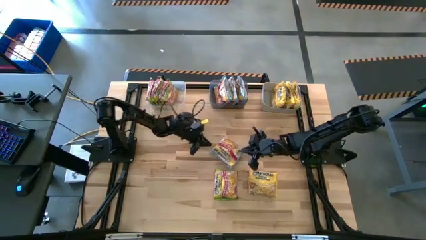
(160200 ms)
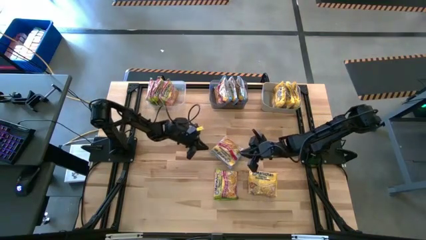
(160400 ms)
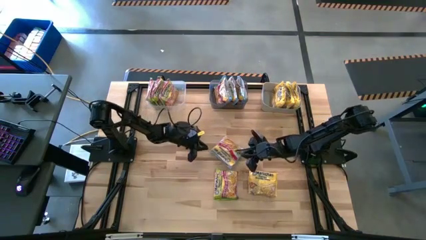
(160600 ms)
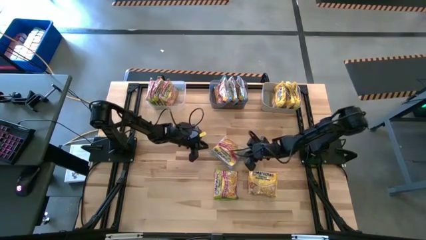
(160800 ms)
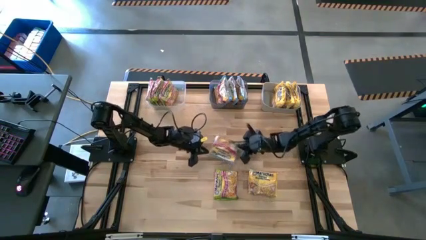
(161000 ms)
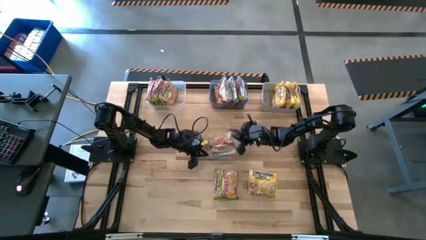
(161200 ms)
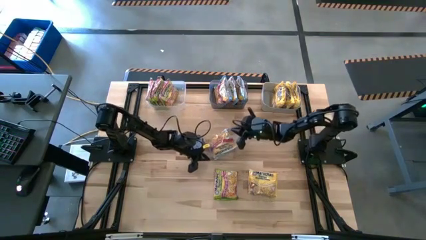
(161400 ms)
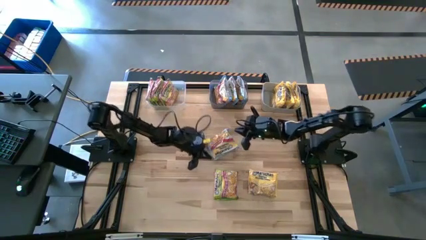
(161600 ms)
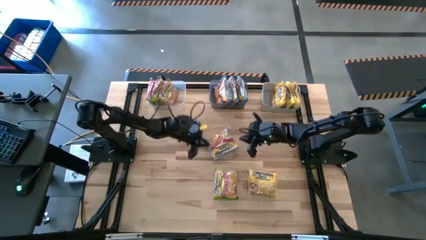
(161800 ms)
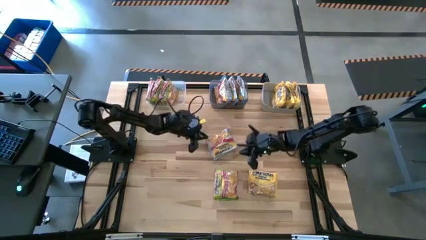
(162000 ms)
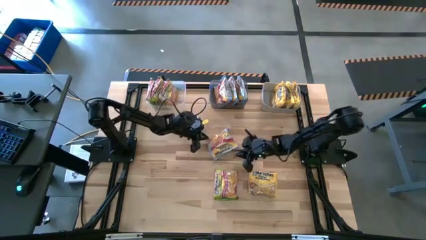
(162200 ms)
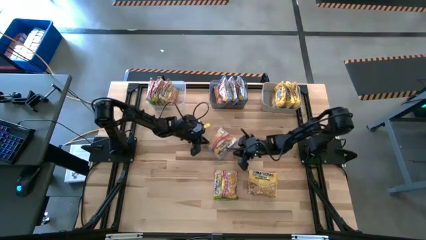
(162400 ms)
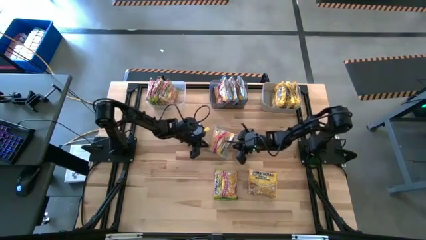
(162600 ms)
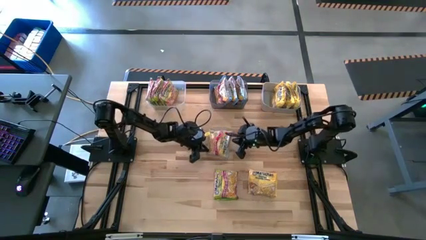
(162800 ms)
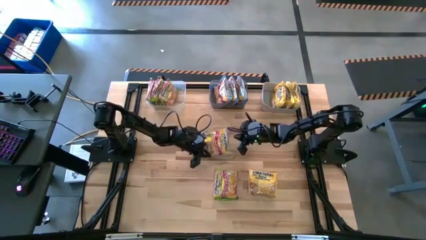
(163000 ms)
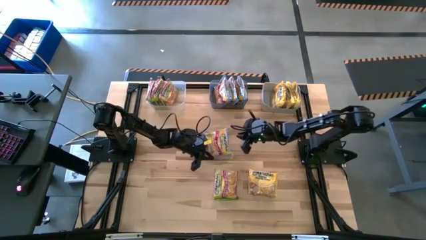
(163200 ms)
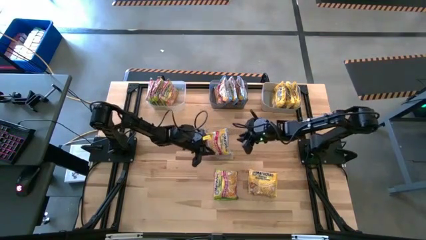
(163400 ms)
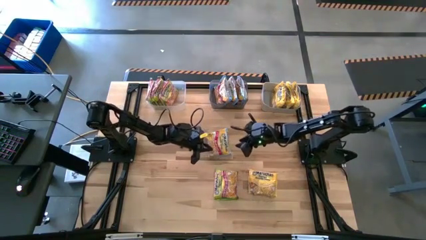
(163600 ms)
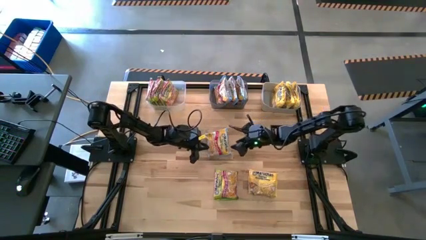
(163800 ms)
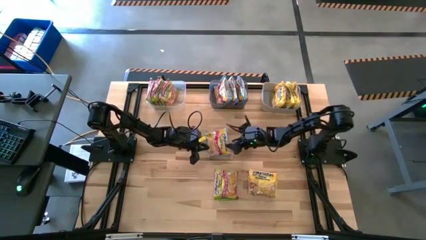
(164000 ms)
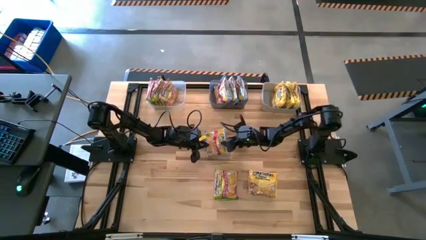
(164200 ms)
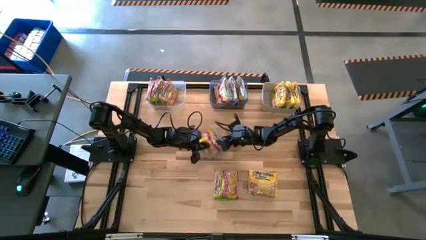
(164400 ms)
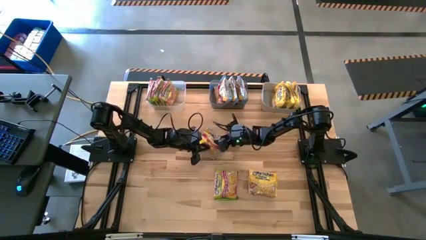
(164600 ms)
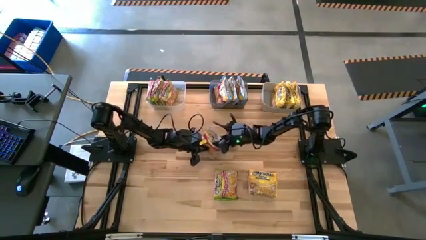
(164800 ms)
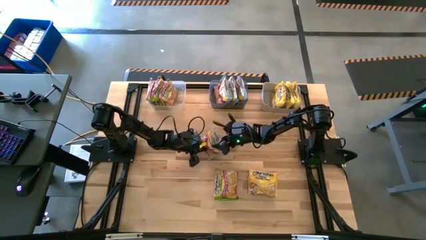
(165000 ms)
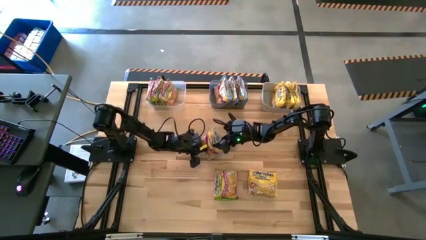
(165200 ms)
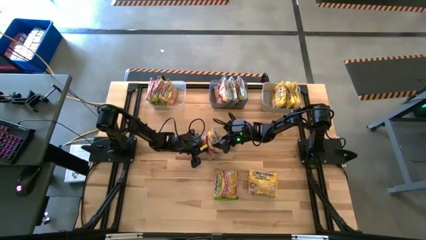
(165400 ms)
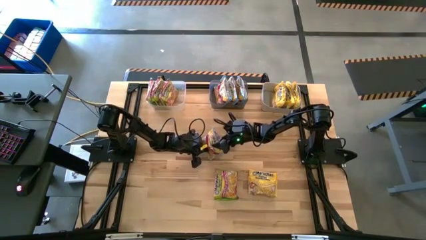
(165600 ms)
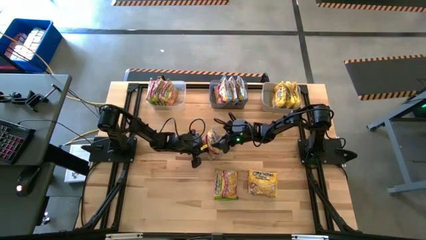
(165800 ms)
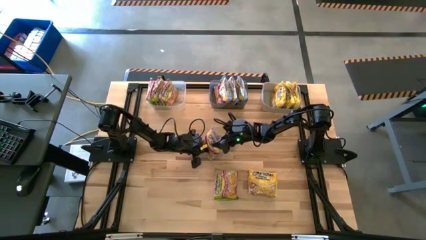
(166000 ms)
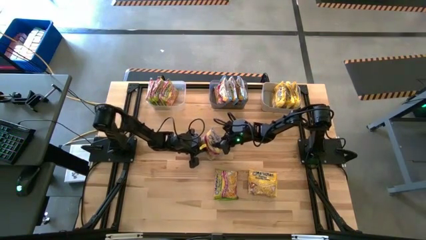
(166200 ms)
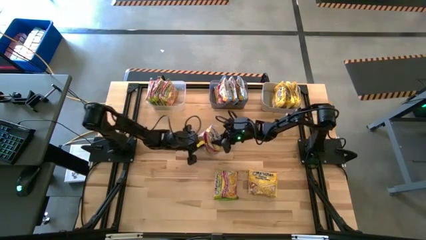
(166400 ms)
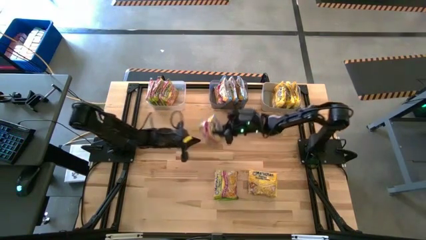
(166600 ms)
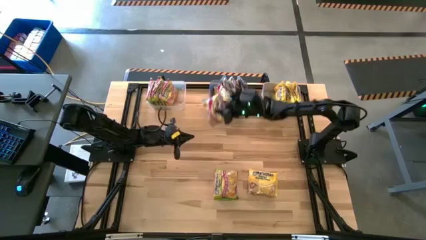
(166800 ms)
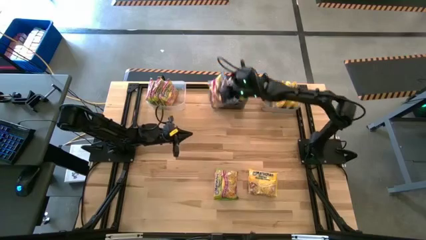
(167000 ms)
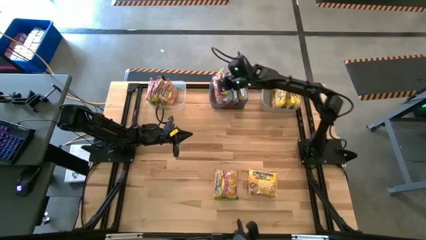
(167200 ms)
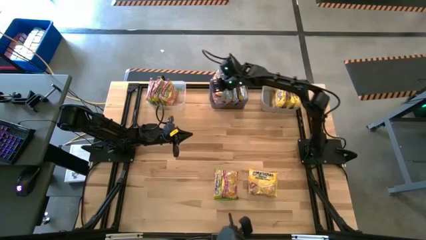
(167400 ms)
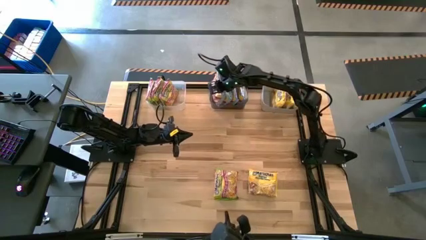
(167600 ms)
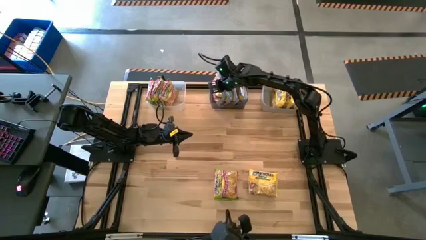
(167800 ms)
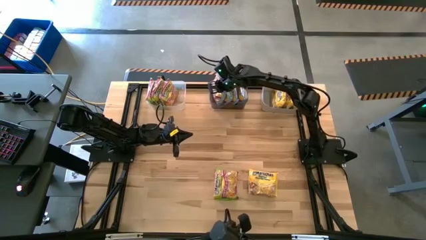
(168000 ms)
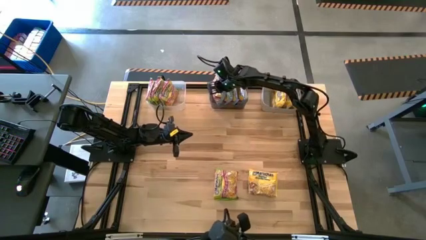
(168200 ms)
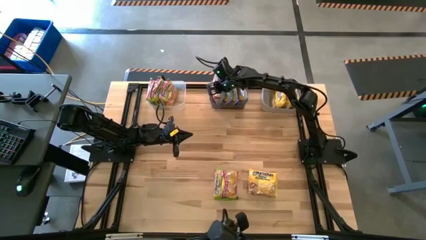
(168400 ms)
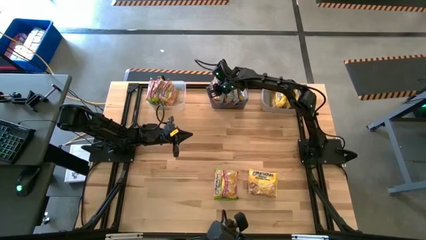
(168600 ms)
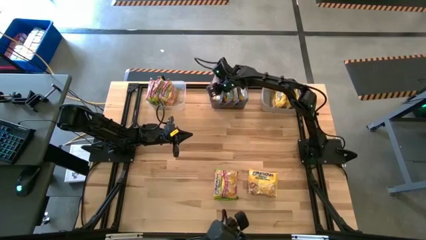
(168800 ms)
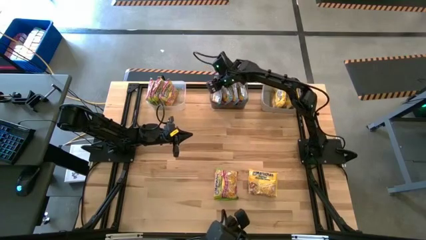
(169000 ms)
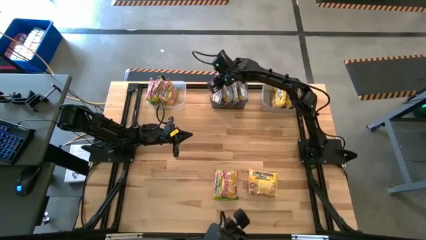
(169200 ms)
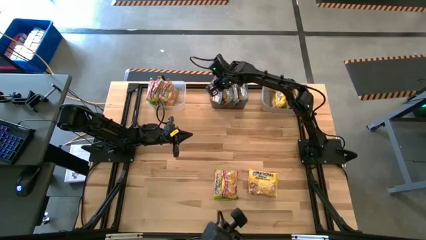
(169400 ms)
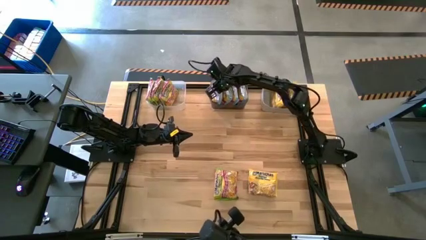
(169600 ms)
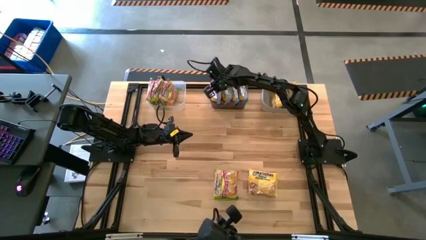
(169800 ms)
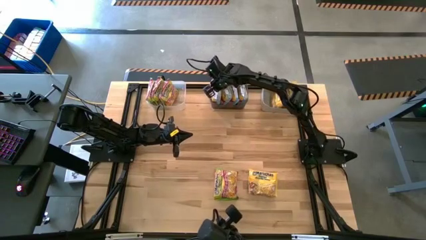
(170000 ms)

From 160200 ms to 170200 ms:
Task: Sort Maruchan noodles
Put the blue noodle pack into the black bin

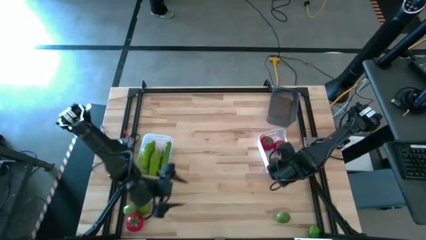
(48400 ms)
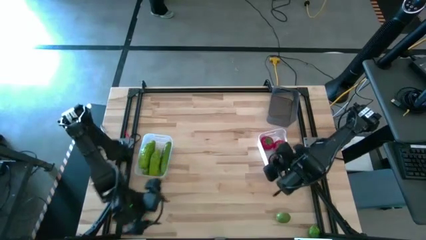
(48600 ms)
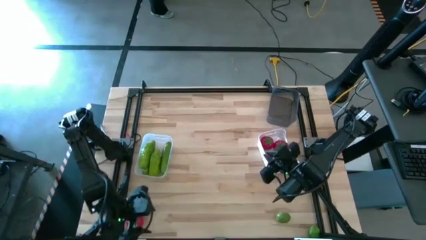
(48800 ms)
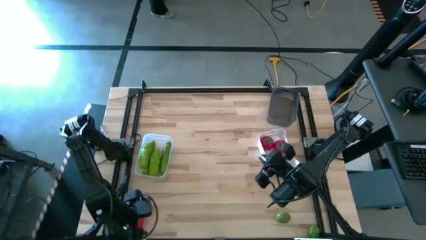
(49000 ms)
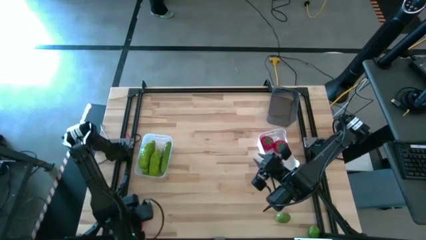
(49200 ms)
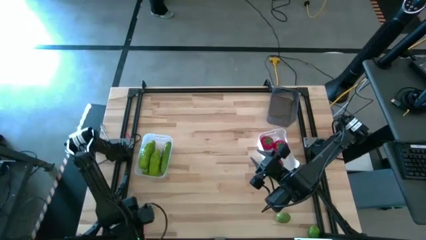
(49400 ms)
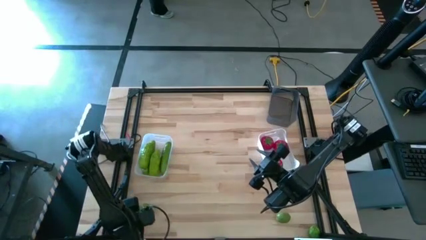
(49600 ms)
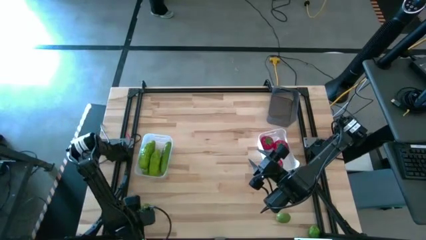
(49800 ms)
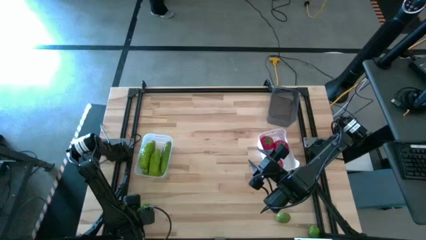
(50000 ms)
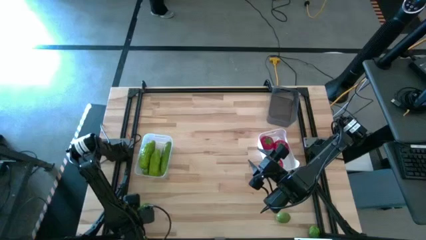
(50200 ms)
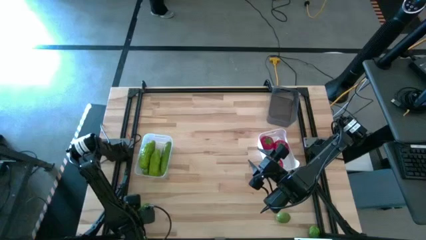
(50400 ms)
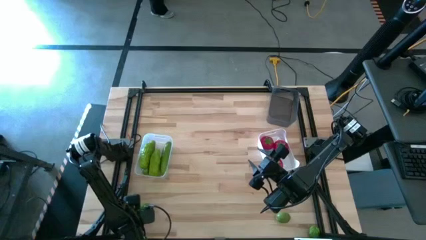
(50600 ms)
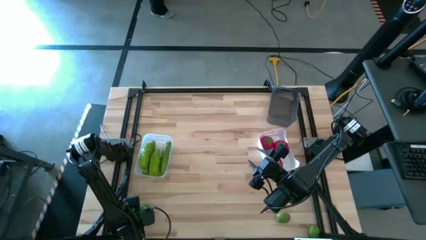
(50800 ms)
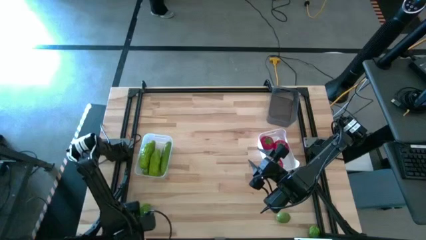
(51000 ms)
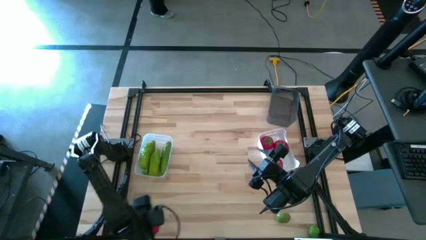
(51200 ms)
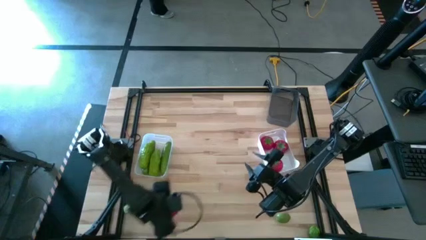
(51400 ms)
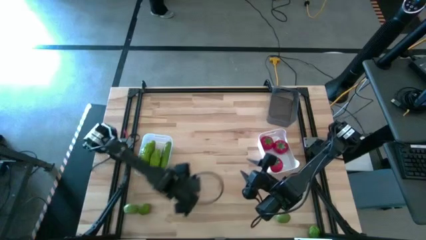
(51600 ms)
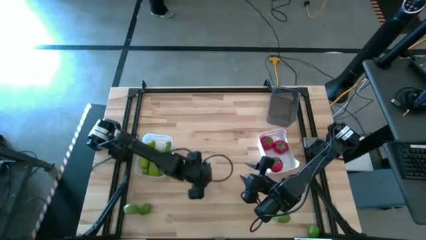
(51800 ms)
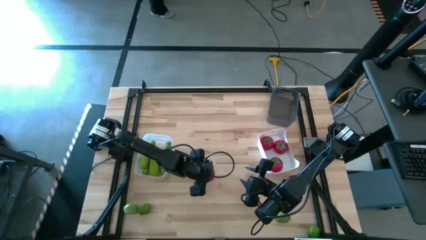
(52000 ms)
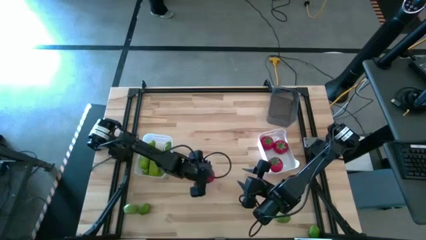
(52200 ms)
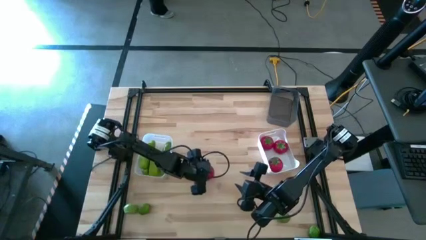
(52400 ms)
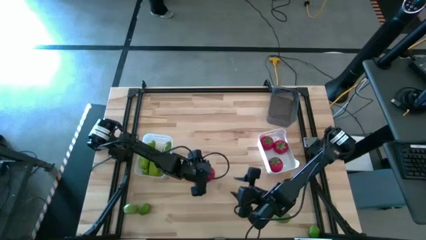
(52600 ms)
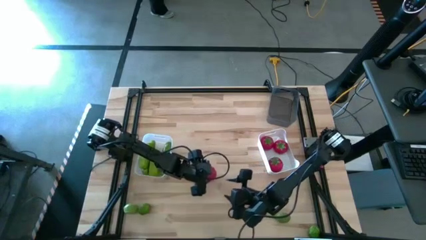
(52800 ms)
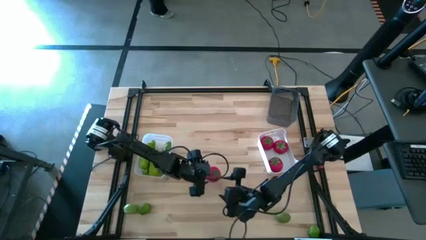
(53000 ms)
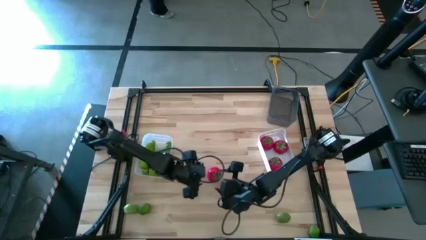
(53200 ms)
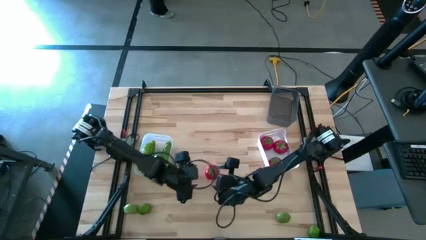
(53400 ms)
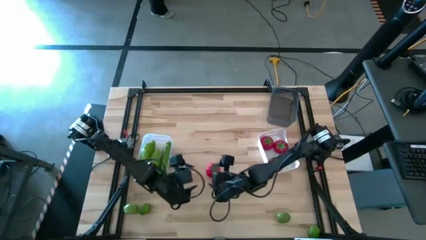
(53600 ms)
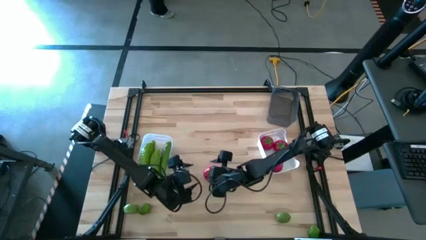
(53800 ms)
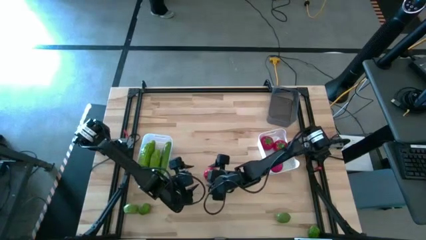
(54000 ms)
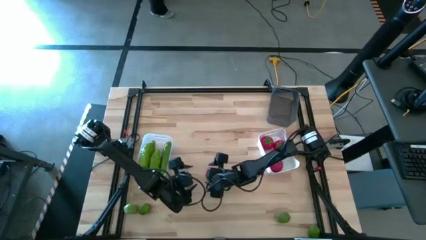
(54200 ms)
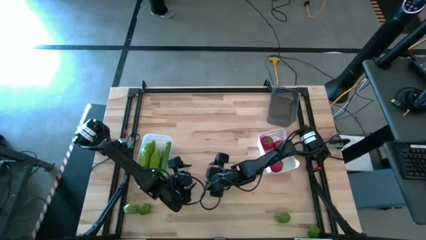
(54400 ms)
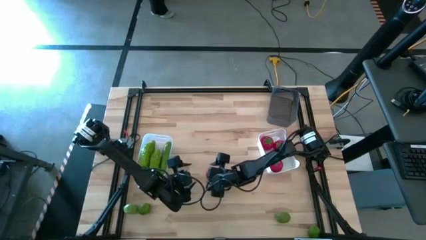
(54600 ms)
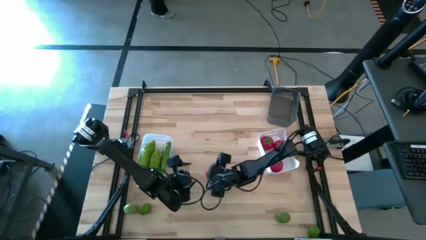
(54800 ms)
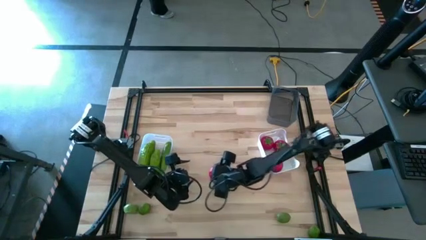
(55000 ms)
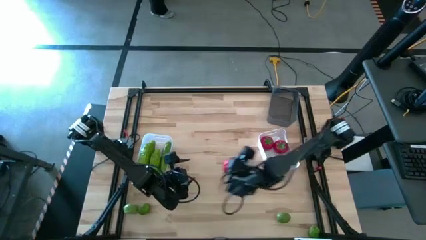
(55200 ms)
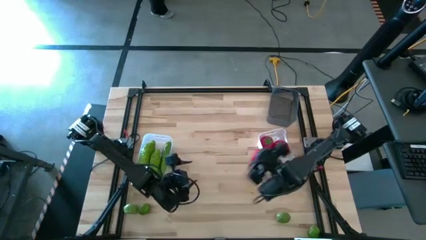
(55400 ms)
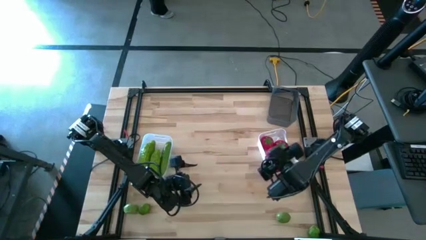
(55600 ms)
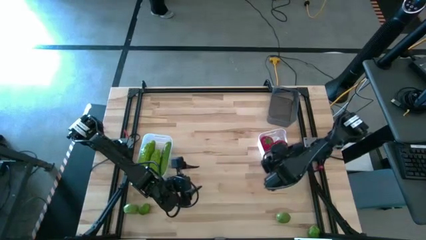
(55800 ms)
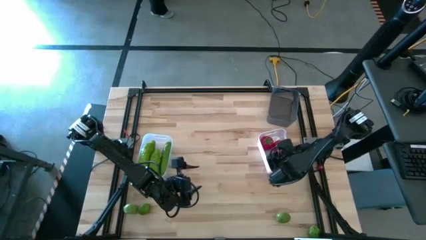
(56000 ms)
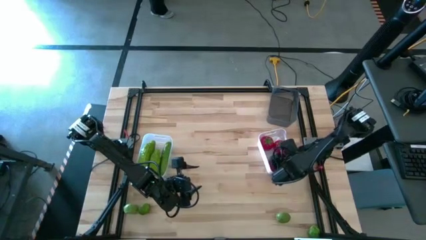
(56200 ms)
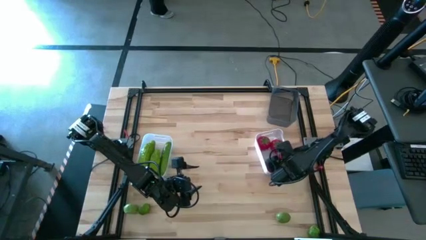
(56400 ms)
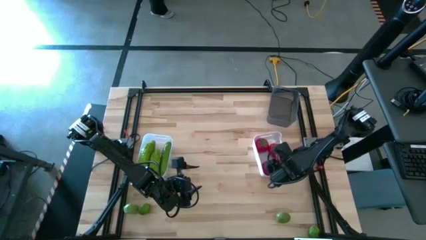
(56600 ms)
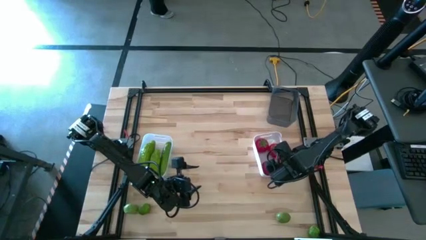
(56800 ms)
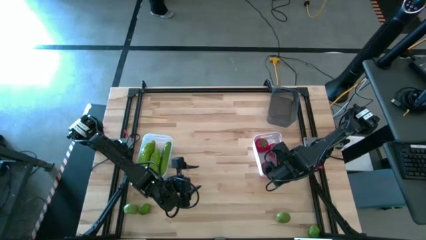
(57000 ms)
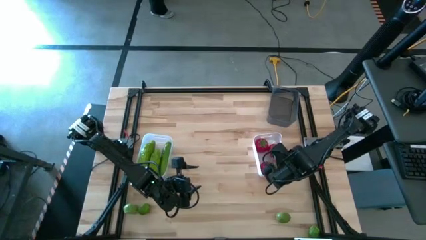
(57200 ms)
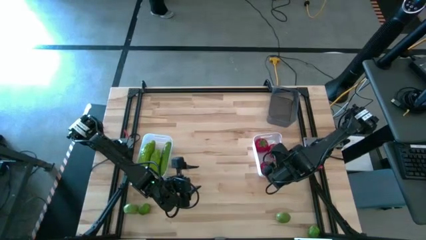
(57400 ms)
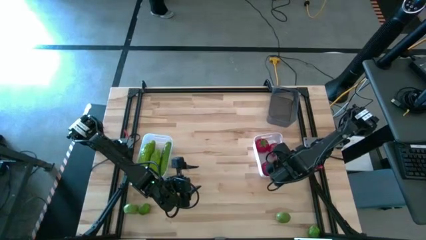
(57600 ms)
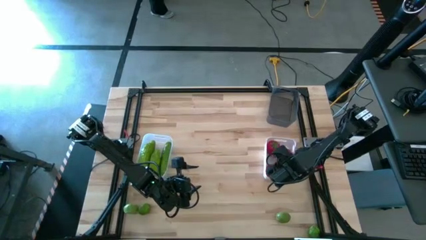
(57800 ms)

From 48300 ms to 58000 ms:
Task: Sort produce into baskets
Put the tomato into the white bin
